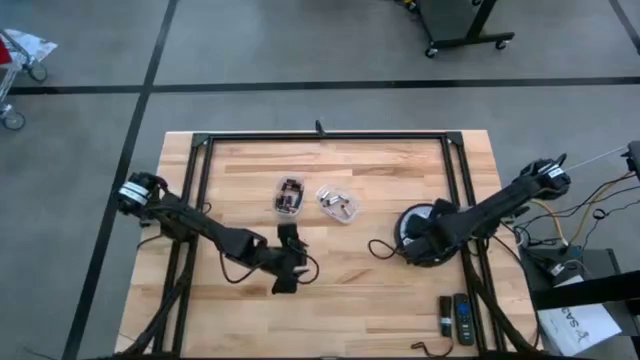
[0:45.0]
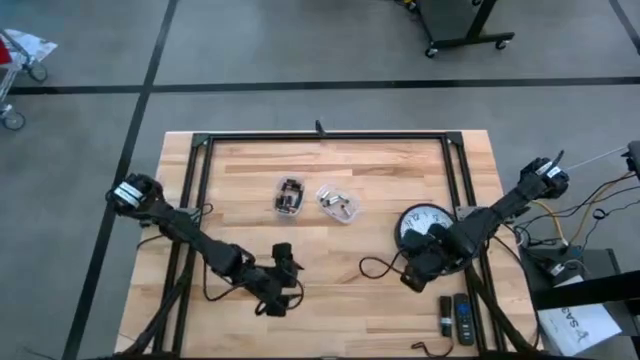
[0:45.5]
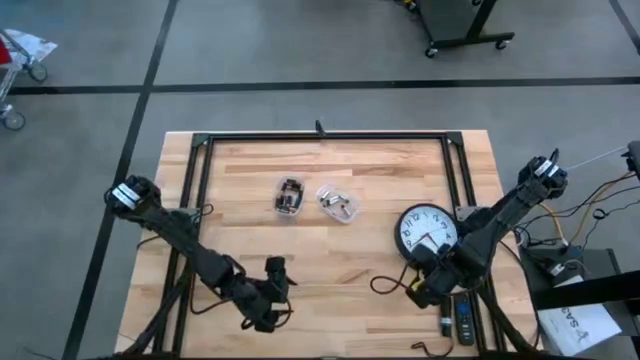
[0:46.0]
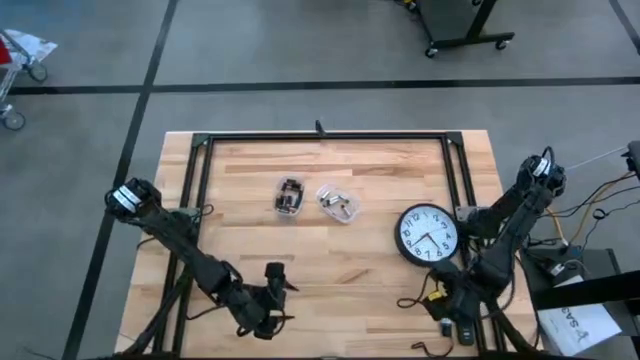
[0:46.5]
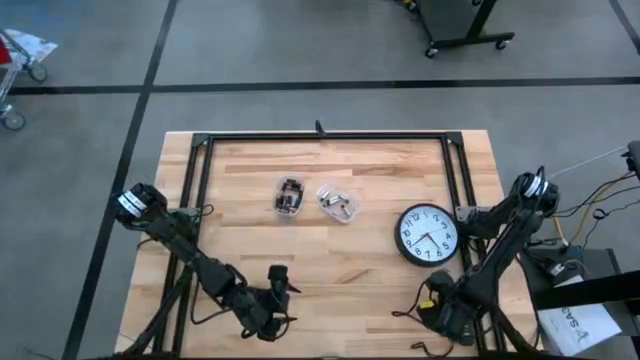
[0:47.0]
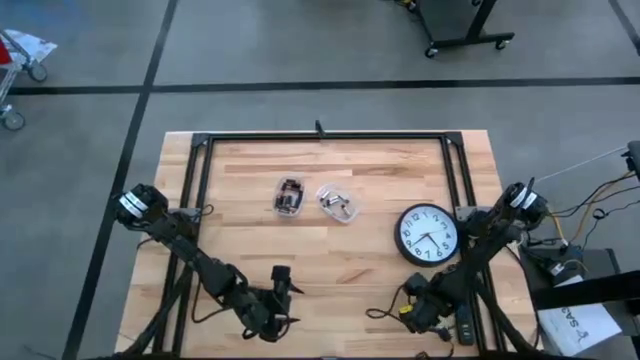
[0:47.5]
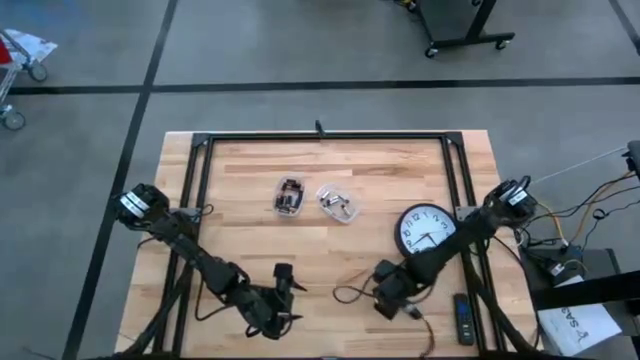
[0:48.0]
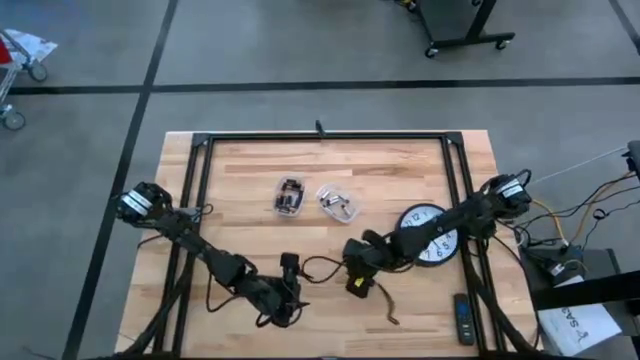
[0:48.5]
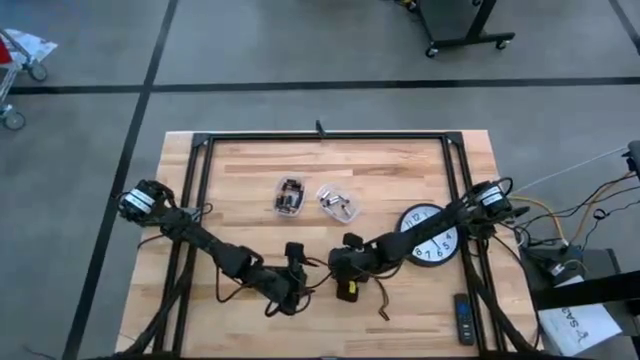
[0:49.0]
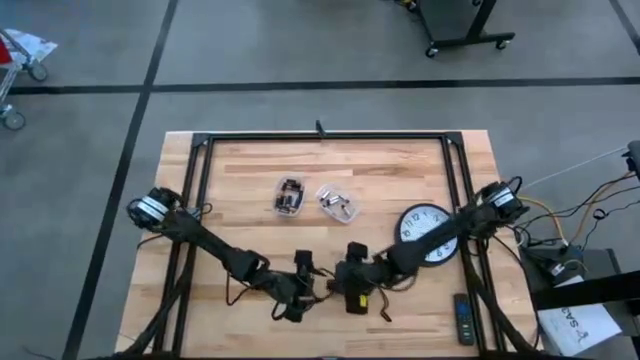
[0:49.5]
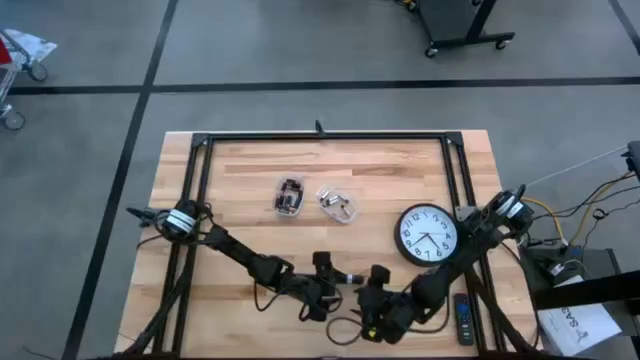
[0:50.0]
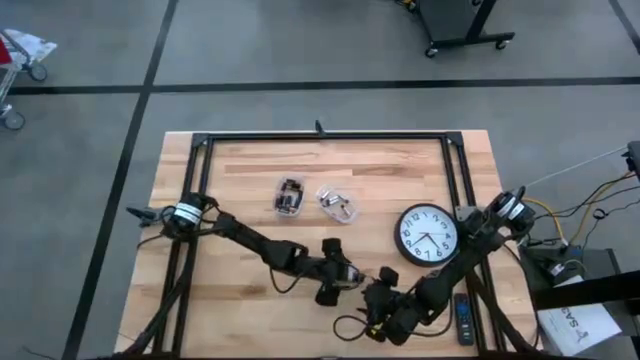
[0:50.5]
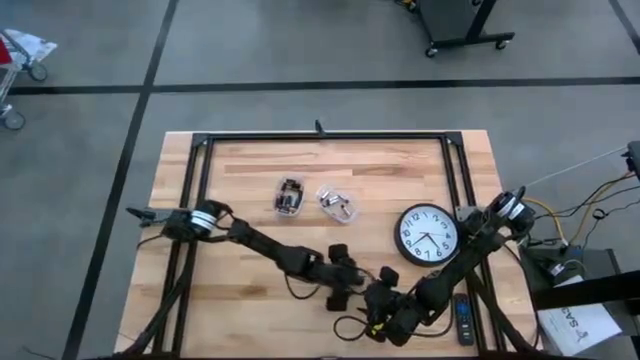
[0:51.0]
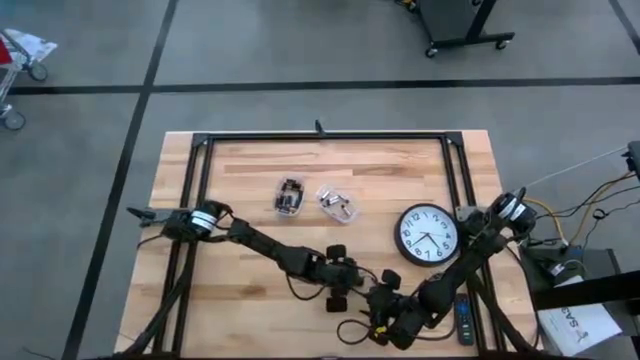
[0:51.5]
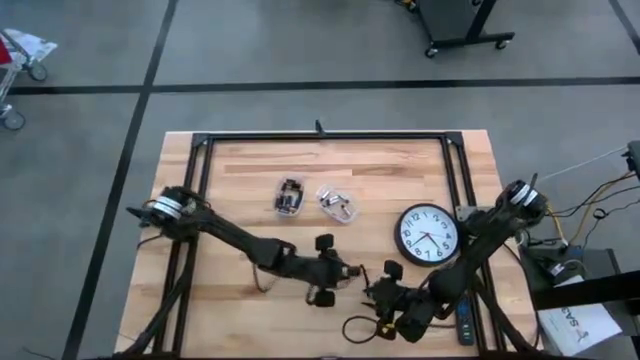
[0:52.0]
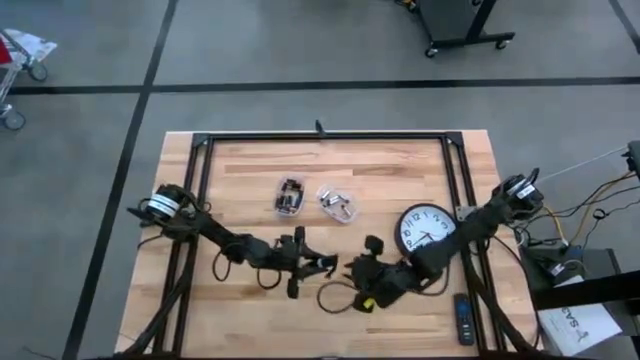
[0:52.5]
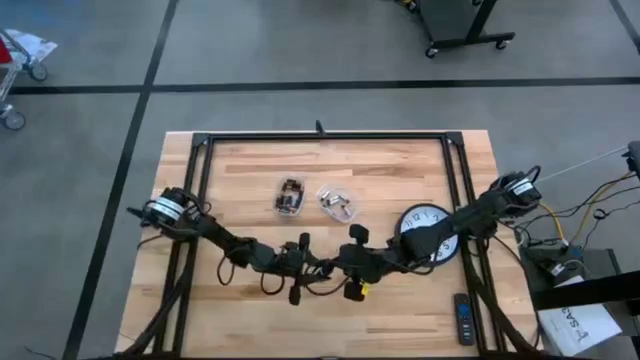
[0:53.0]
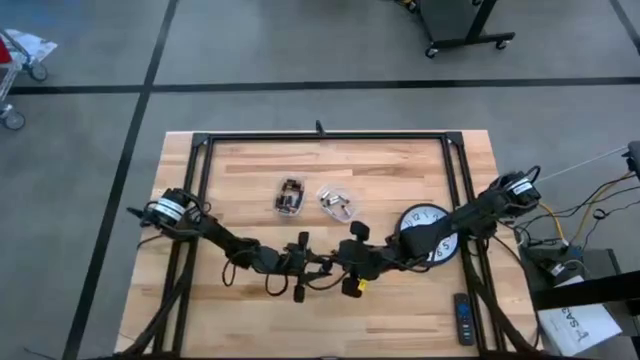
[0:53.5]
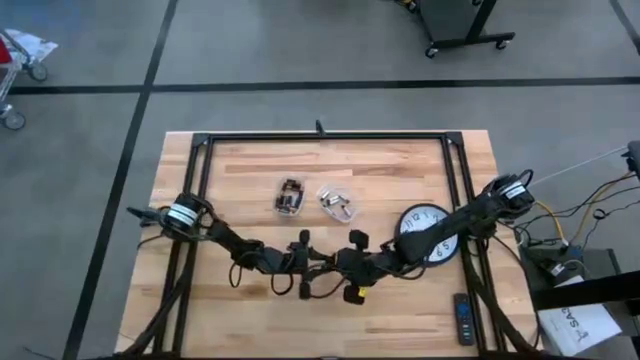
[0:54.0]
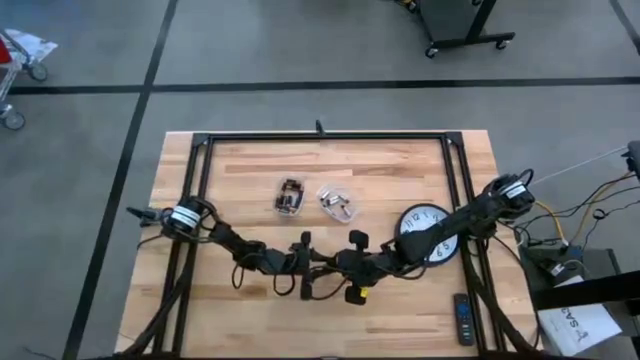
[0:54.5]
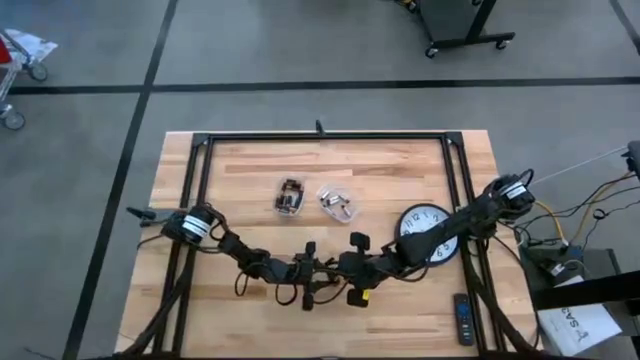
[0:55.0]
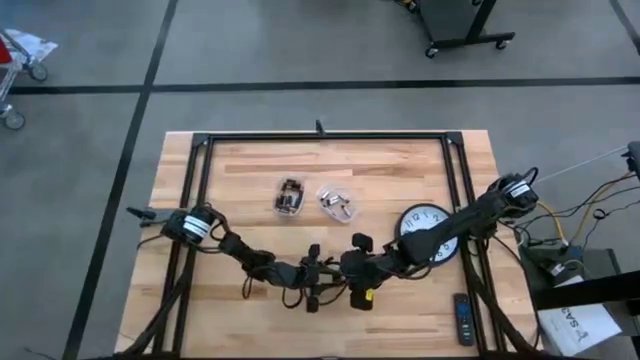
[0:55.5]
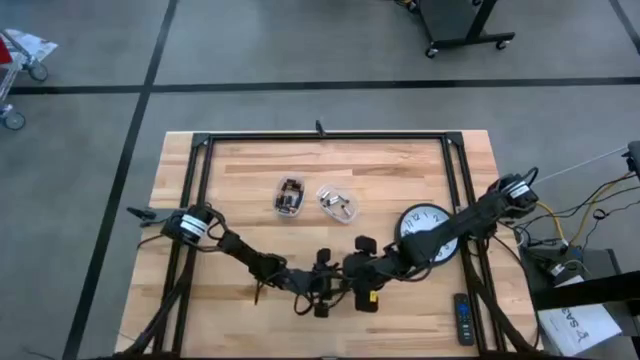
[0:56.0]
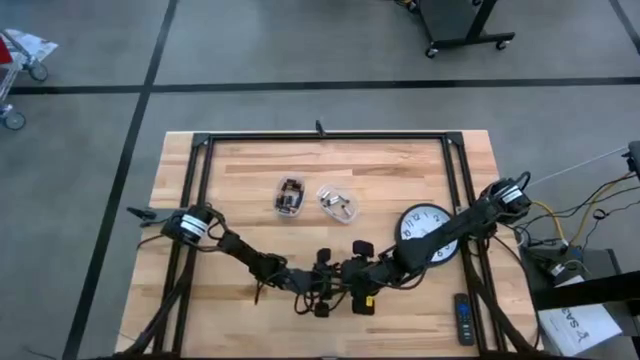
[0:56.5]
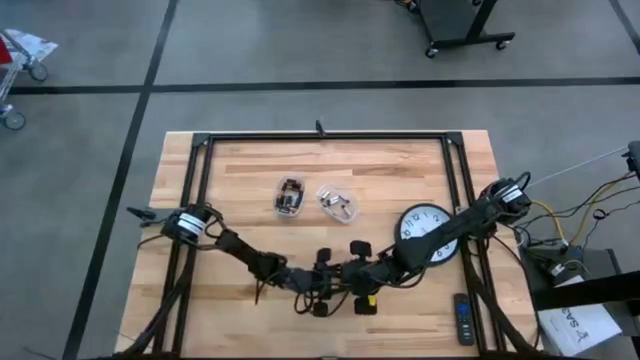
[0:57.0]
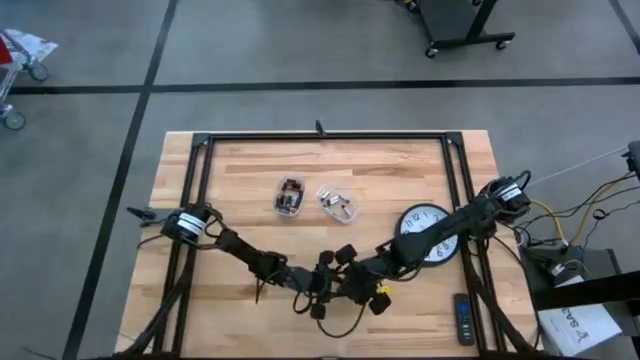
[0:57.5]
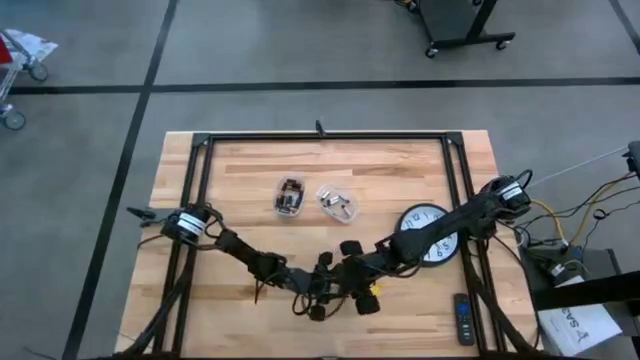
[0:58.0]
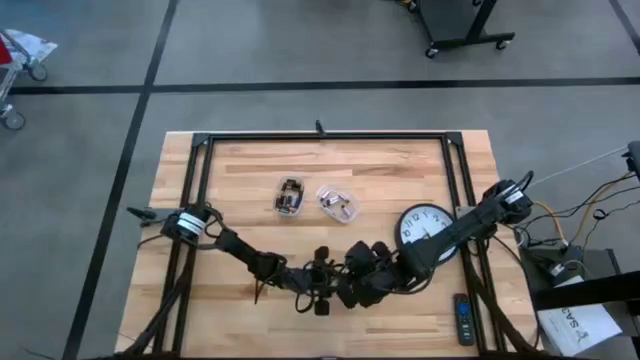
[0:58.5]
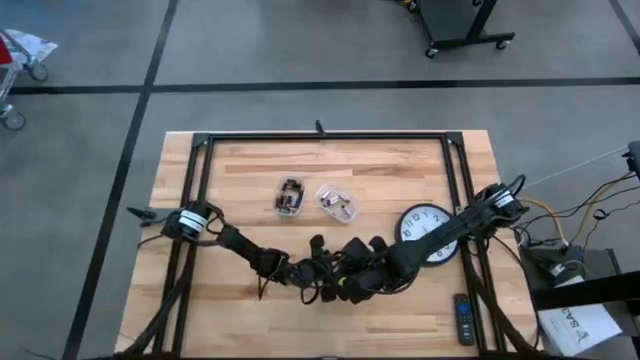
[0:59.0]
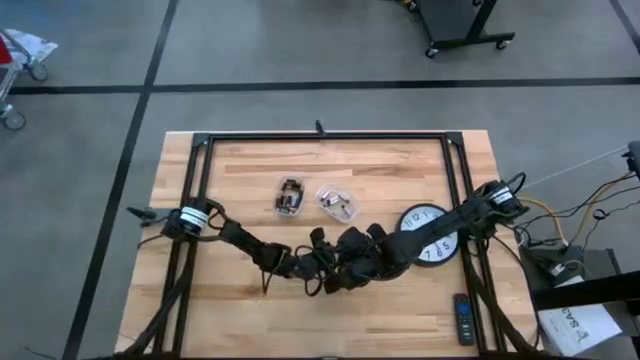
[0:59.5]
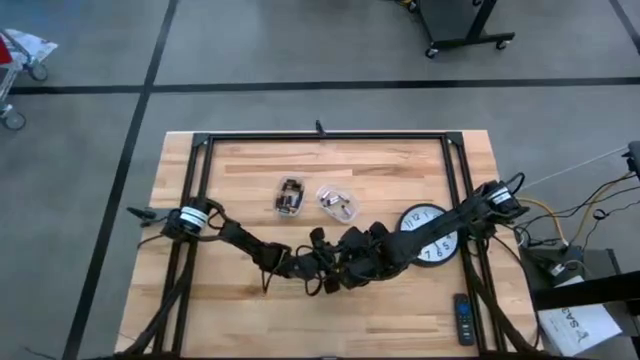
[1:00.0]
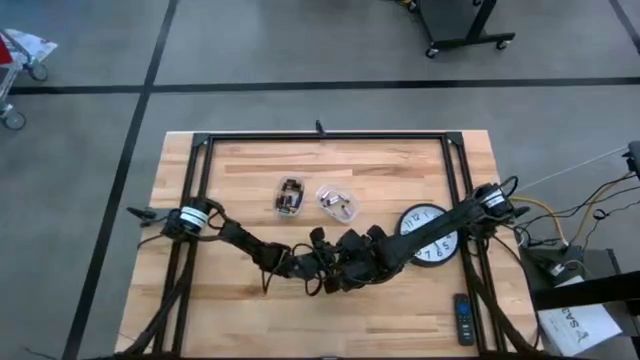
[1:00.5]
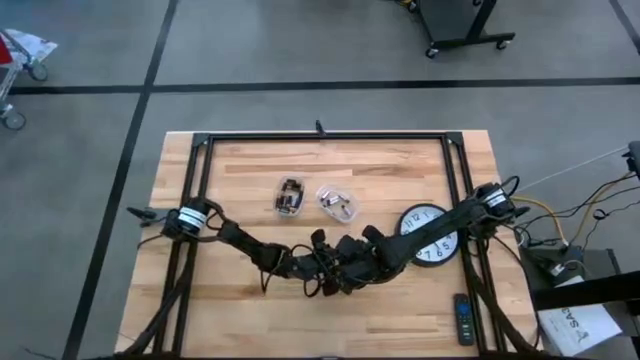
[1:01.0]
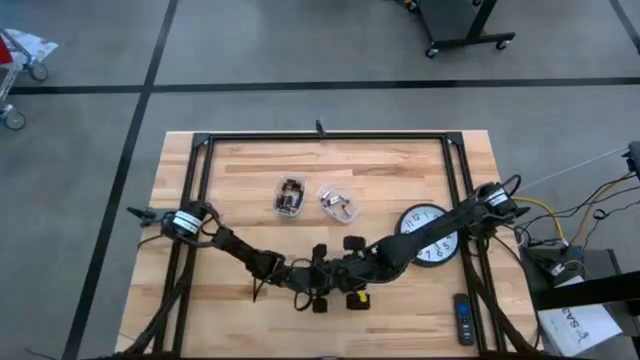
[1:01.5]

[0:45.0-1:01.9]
Task: Insert battery
Open the black flashlight cover

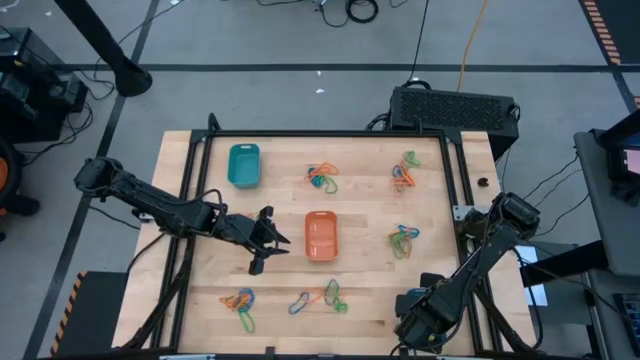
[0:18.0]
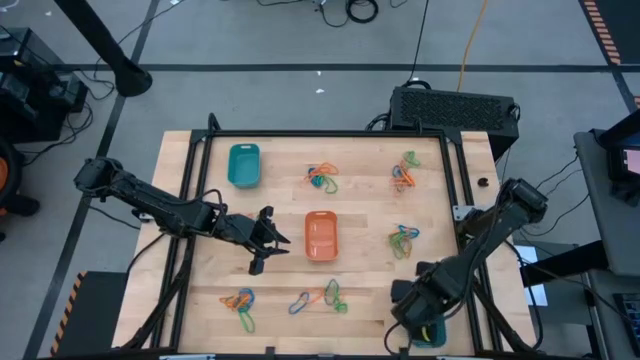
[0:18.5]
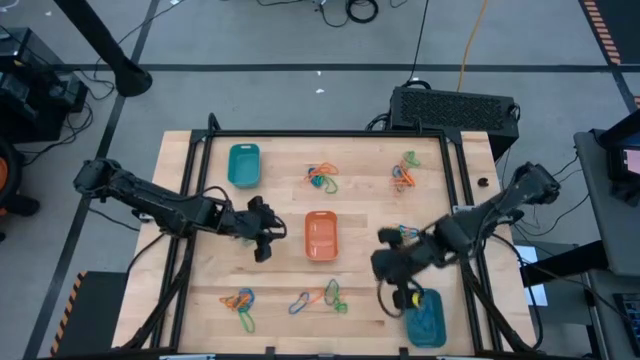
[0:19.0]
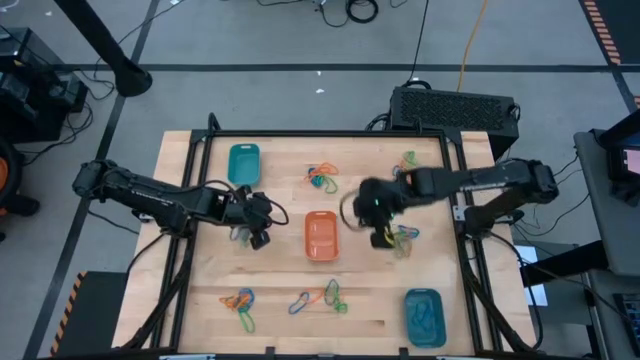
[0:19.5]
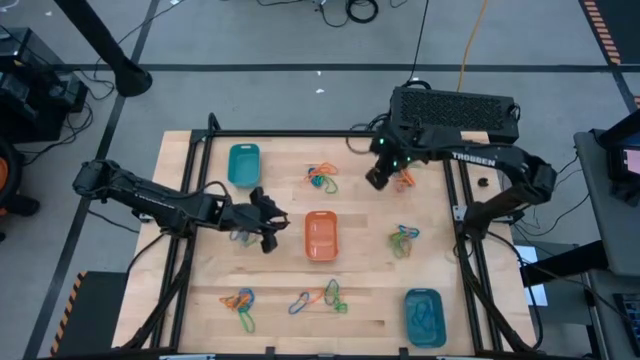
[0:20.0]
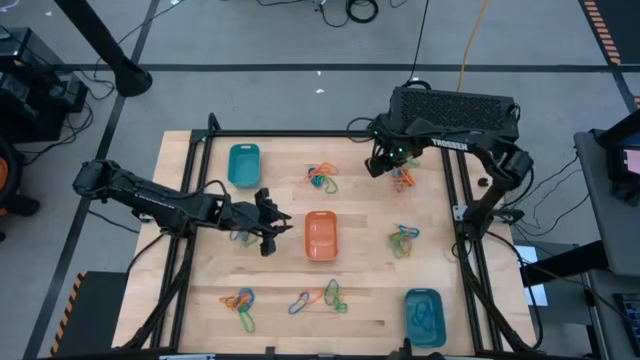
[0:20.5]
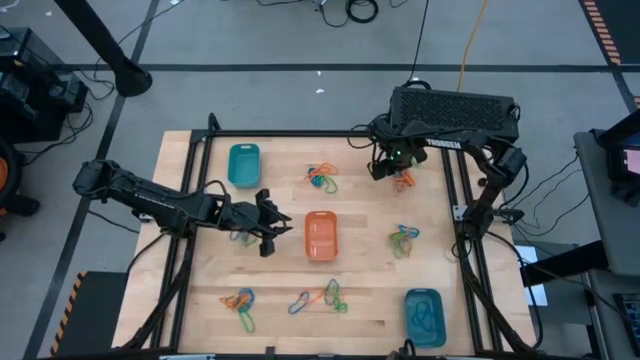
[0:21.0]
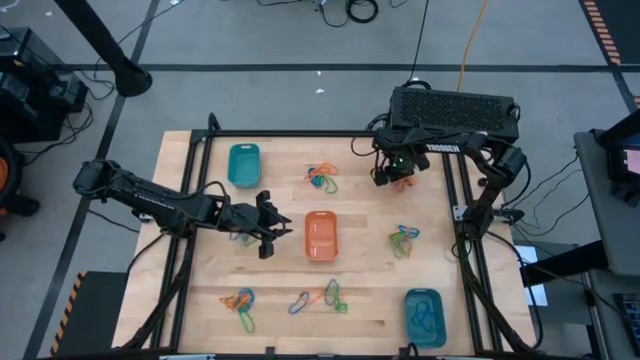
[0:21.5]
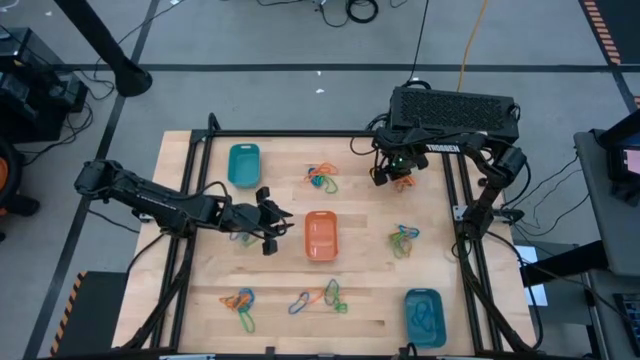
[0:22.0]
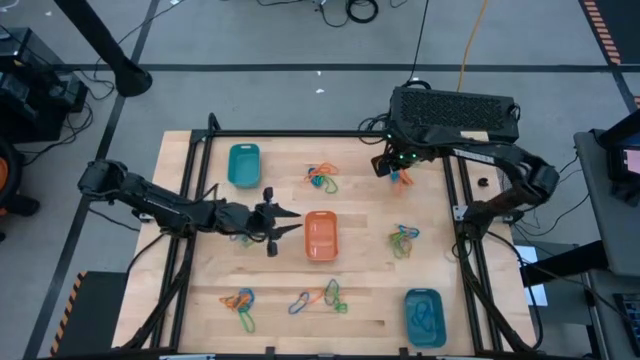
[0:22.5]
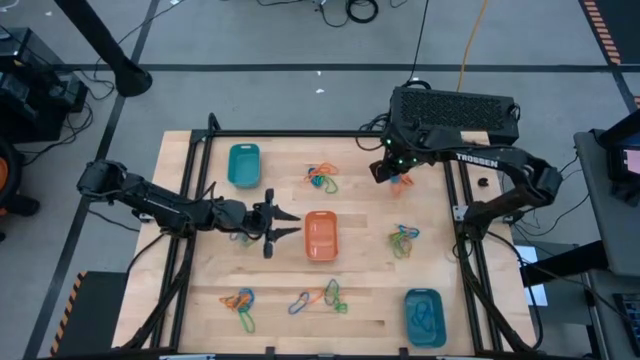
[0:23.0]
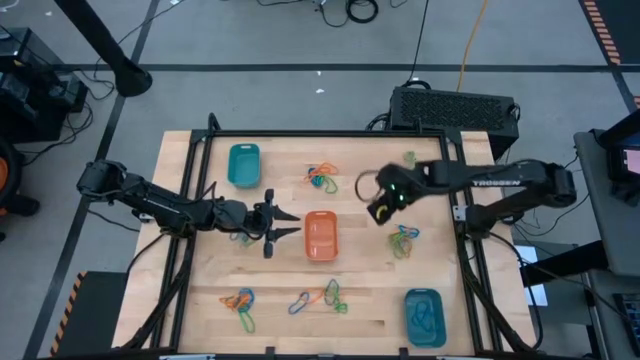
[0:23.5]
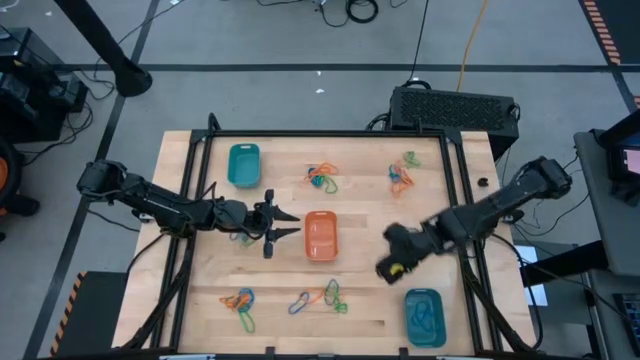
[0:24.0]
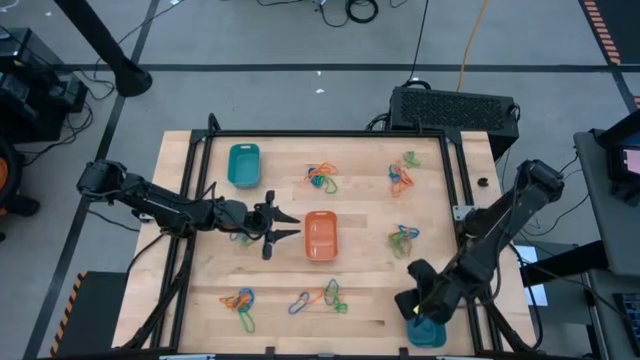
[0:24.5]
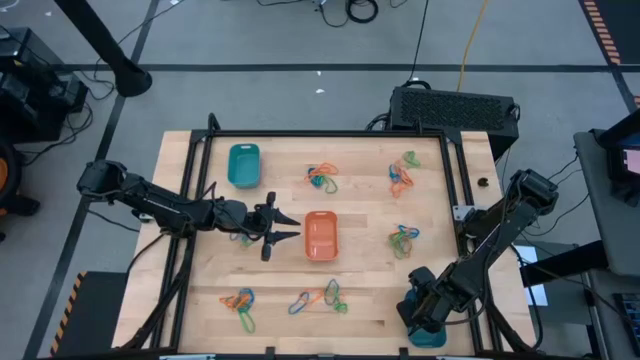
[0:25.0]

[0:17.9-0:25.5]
Task: Sort rubber bands into baskets
Put the blue rubber band into the blue bin
